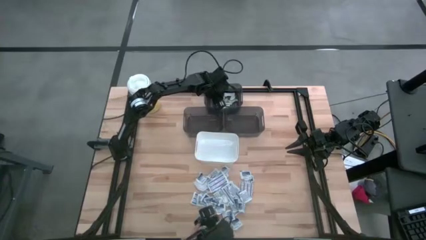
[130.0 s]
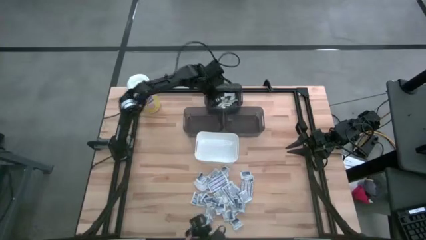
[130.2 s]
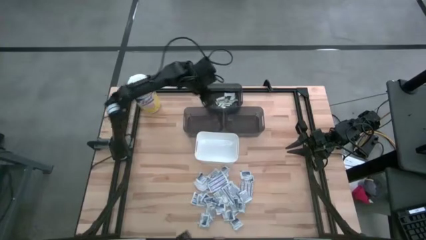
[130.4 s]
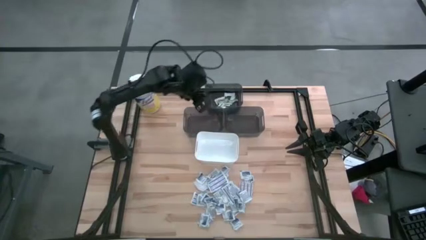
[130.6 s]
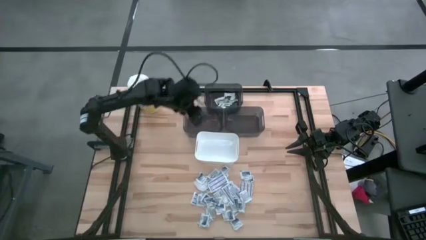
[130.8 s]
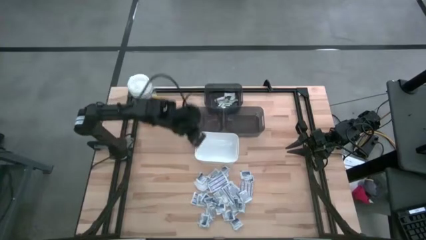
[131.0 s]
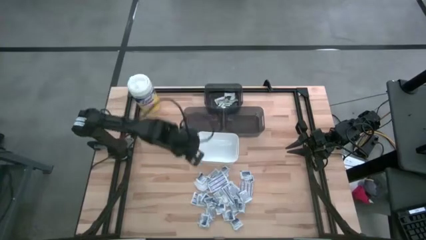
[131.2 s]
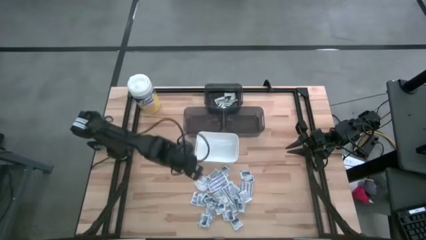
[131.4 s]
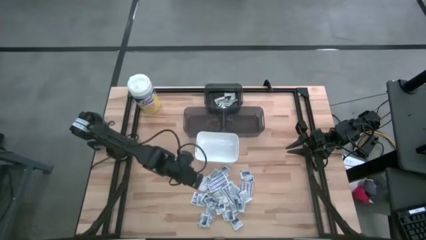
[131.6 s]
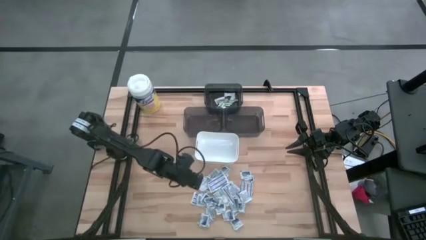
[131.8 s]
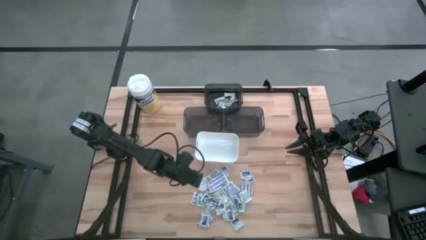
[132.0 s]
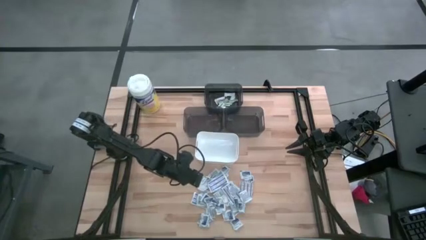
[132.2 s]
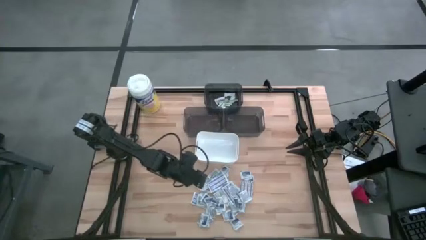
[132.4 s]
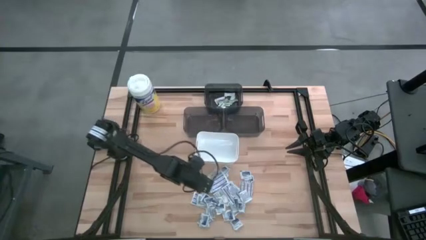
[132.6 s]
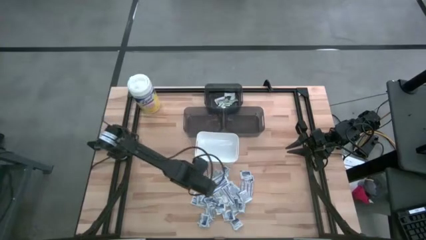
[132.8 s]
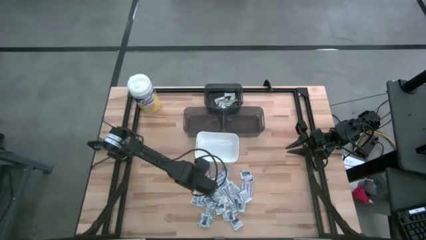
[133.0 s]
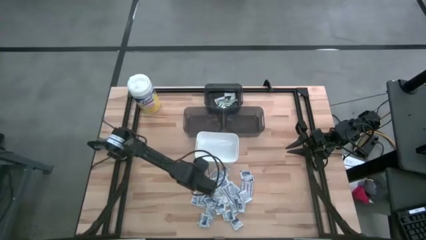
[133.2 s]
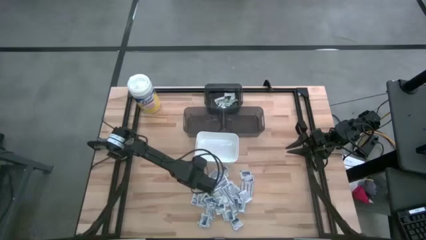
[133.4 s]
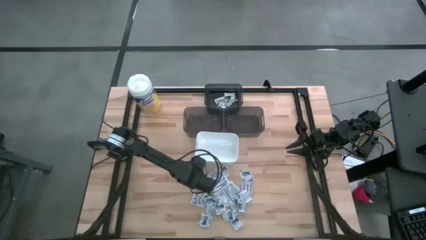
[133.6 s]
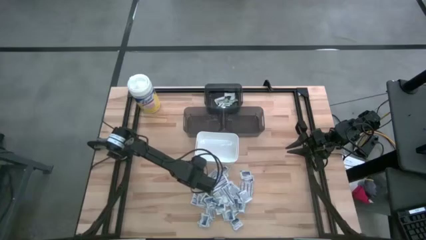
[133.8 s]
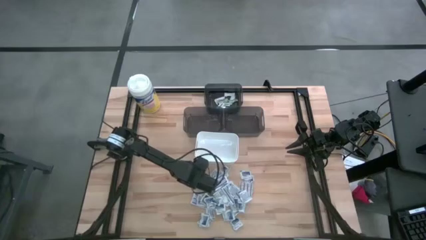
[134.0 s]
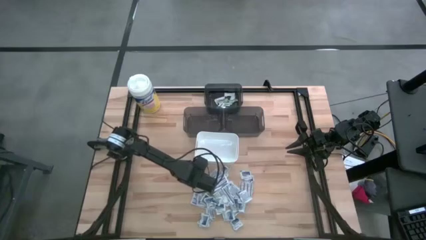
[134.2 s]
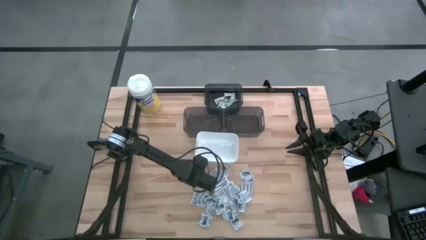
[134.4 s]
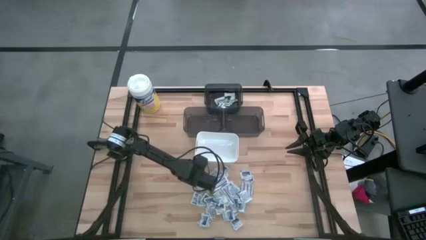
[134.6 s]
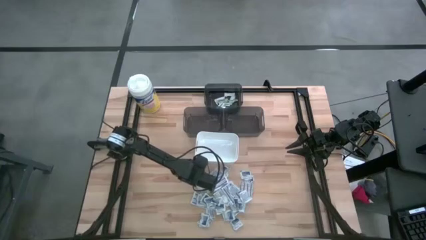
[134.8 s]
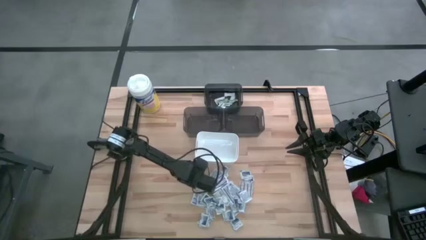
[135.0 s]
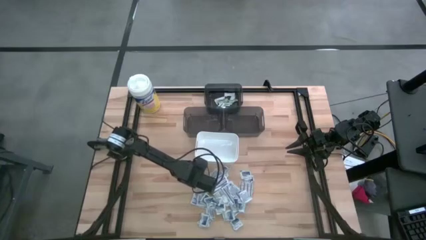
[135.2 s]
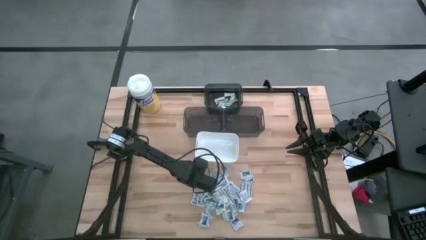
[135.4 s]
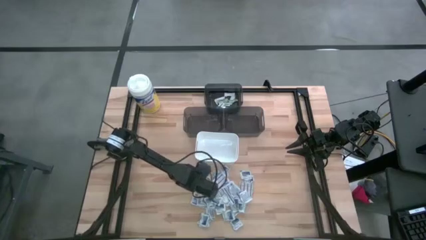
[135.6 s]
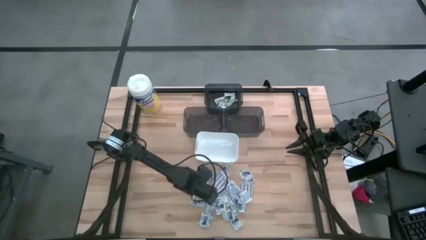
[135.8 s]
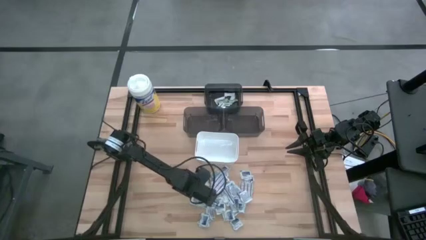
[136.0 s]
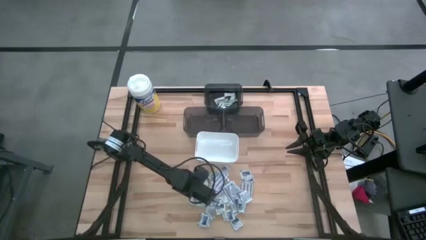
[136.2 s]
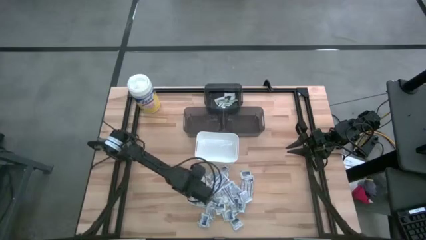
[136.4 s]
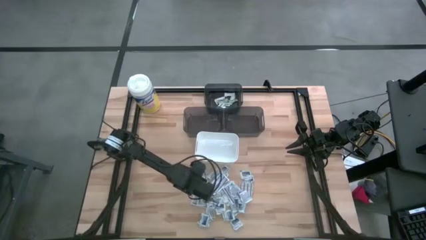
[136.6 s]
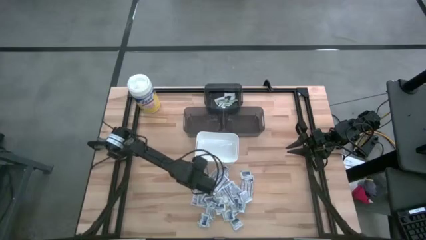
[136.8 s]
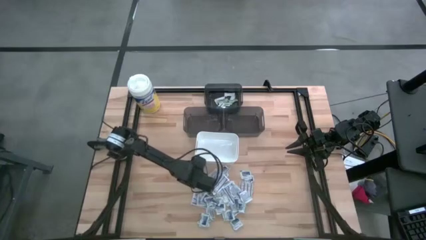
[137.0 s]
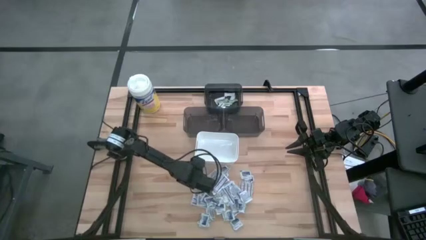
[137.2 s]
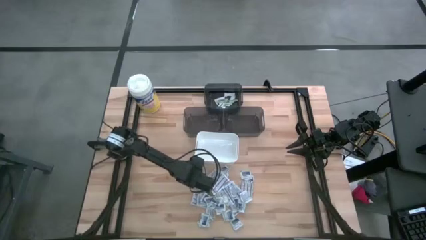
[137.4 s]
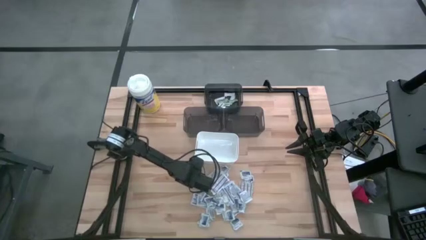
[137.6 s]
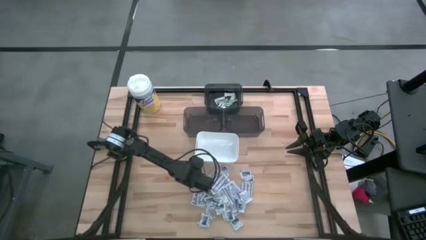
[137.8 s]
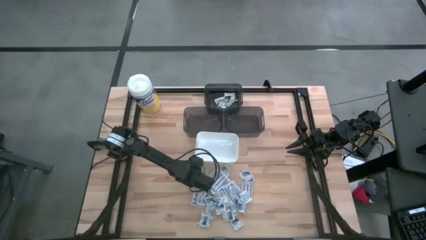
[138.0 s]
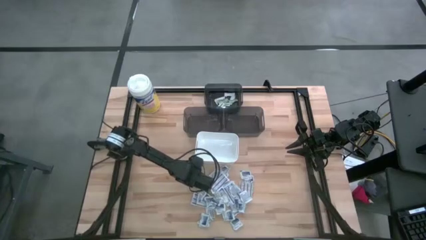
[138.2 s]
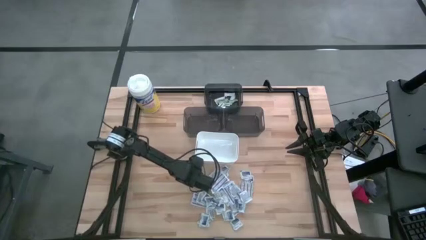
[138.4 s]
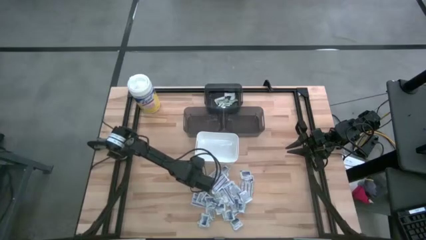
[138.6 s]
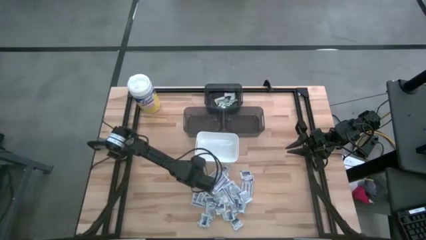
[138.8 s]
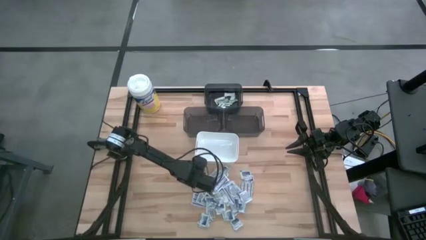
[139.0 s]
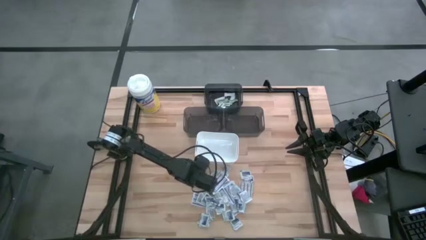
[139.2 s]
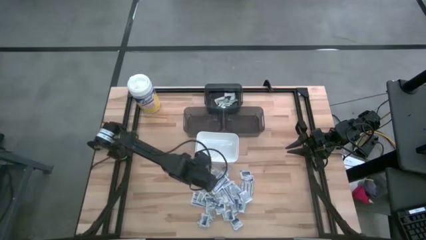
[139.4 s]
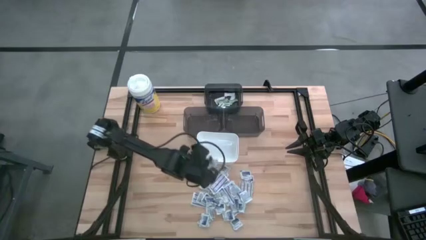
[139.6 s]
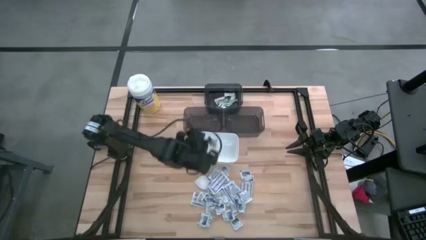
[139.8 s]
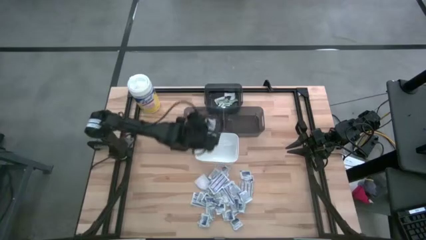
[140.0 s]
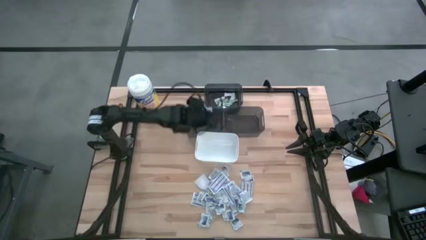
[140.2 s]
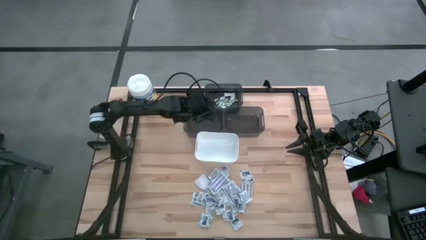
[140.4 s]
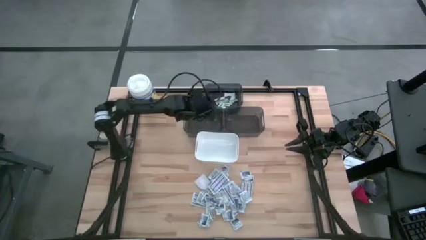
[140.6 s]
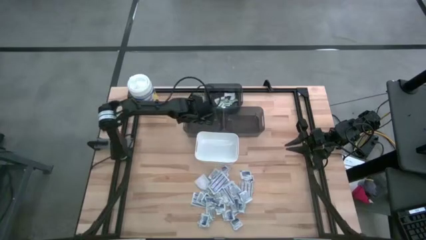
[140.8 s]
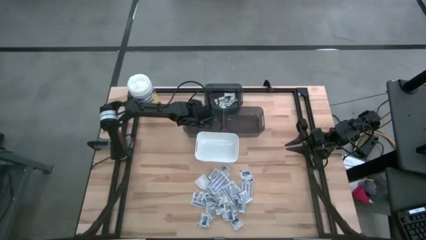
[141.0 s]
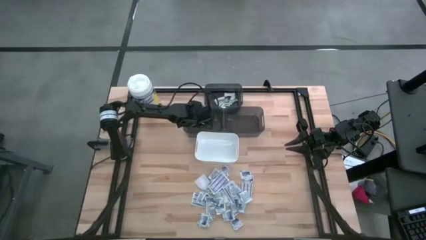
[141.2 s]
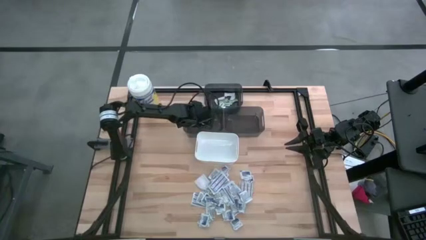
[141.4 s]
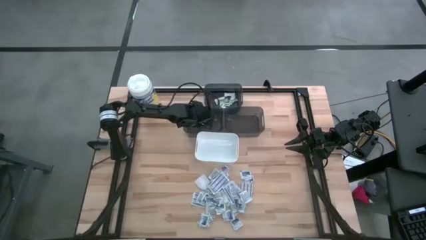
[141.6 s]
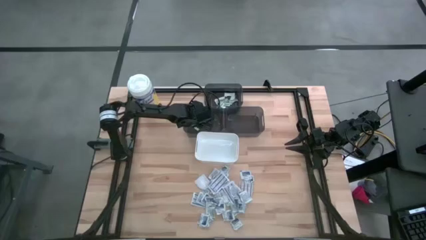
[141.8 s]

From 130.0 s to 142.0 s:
Task: Pick & Place First Aid Supplies
Put the alcohol pad into the left black bin

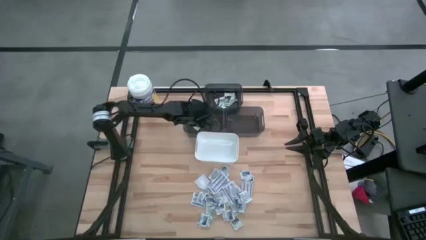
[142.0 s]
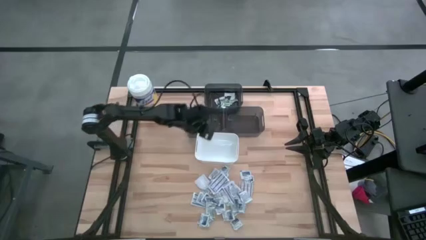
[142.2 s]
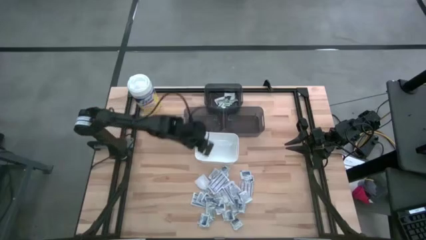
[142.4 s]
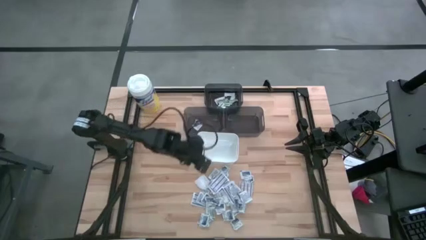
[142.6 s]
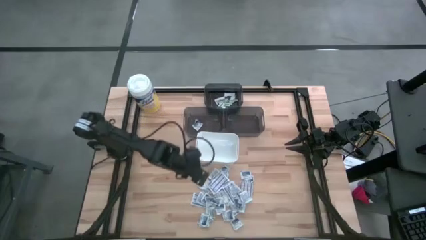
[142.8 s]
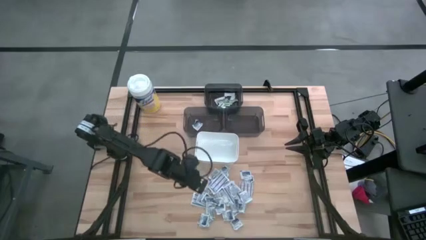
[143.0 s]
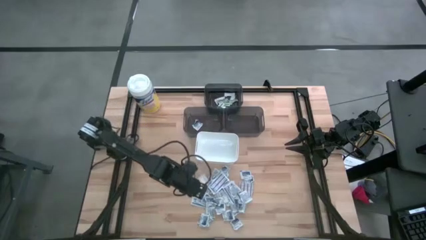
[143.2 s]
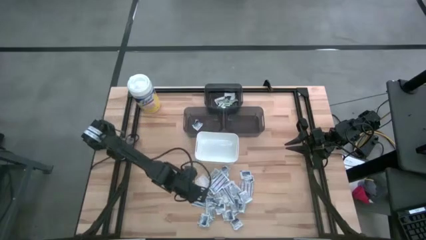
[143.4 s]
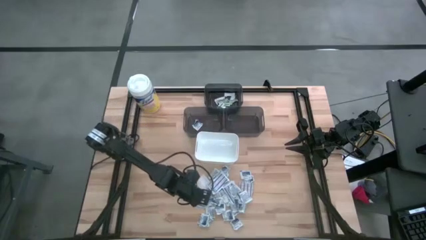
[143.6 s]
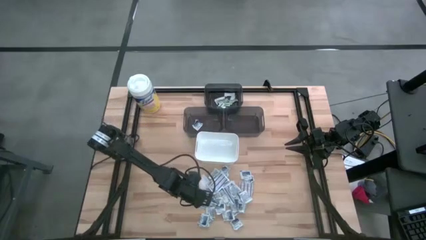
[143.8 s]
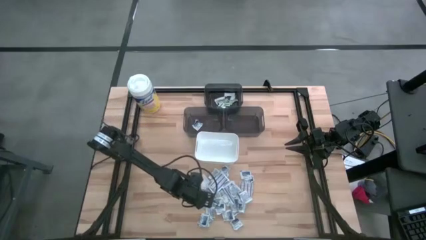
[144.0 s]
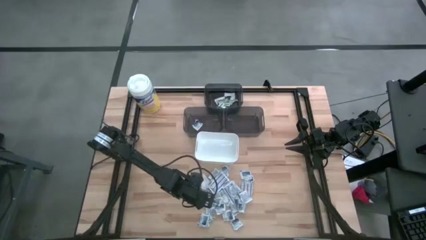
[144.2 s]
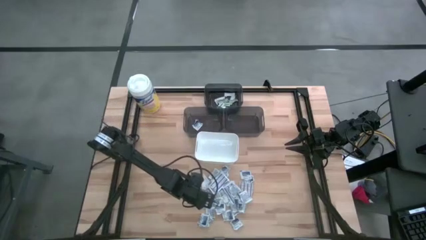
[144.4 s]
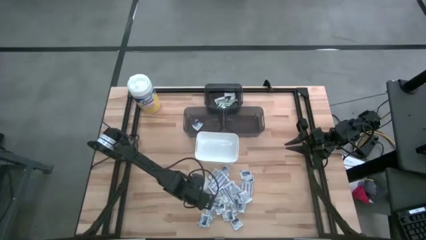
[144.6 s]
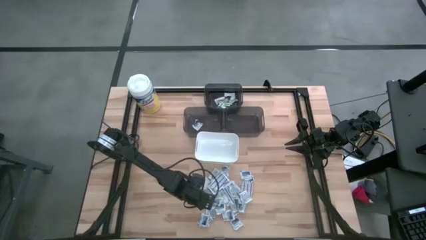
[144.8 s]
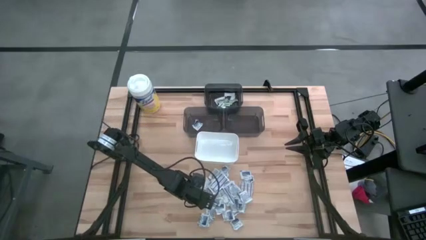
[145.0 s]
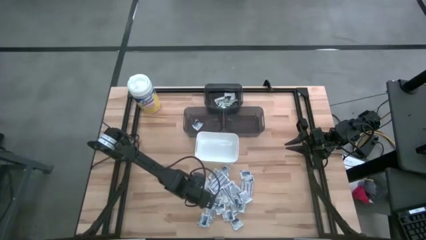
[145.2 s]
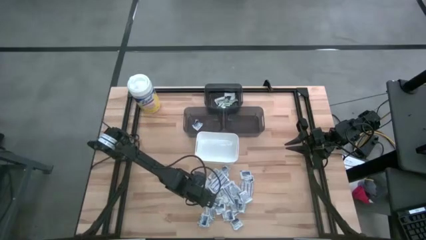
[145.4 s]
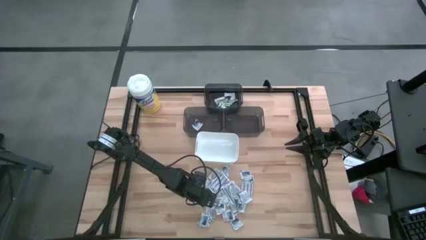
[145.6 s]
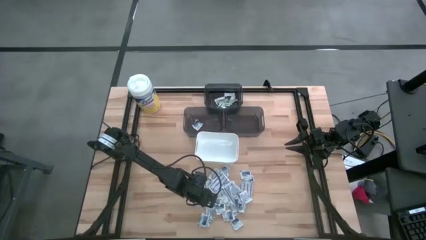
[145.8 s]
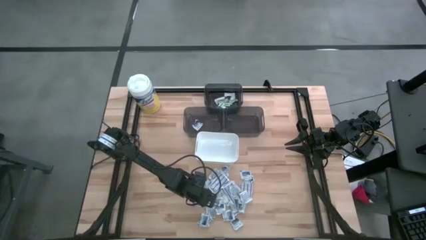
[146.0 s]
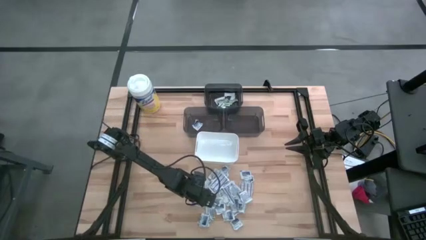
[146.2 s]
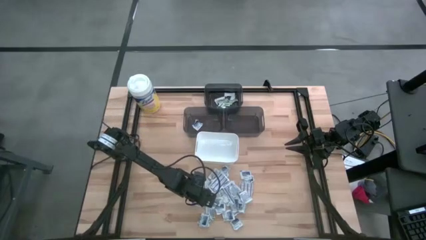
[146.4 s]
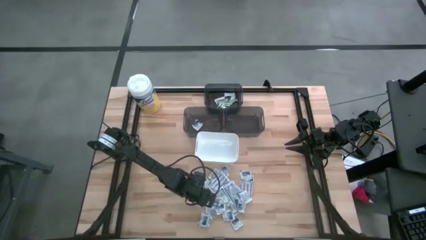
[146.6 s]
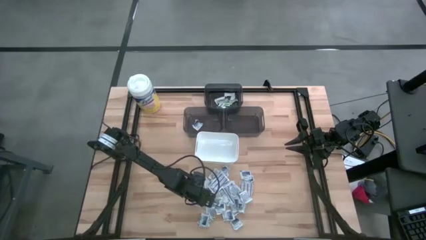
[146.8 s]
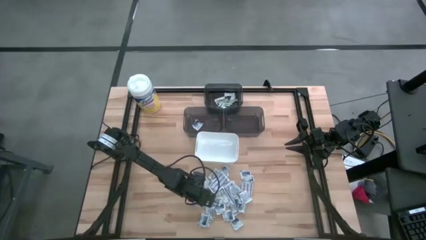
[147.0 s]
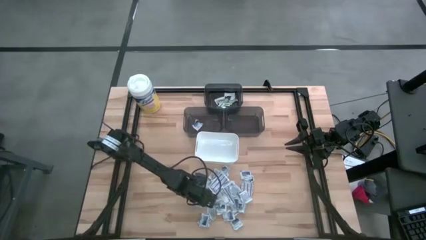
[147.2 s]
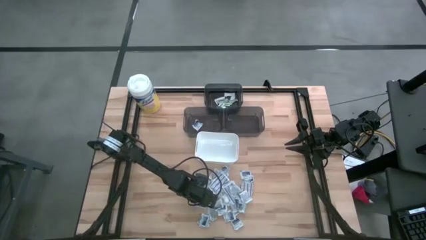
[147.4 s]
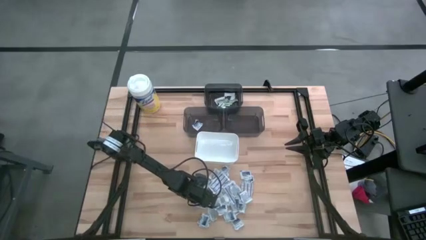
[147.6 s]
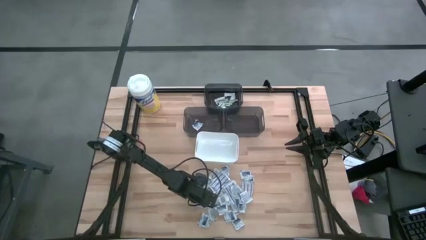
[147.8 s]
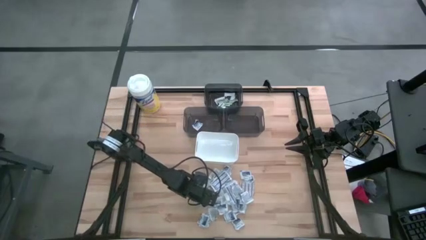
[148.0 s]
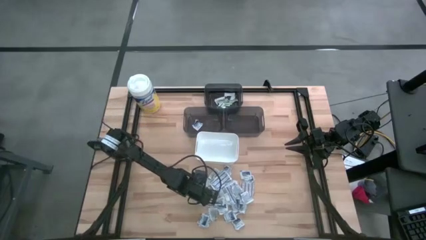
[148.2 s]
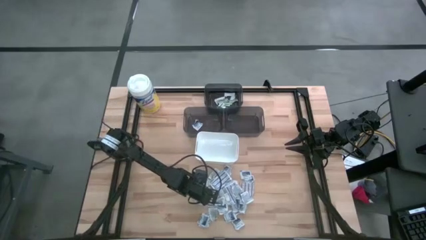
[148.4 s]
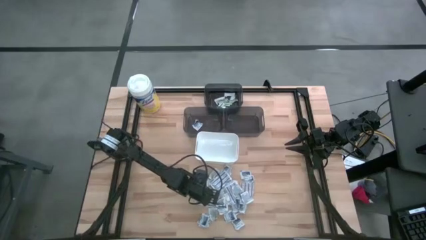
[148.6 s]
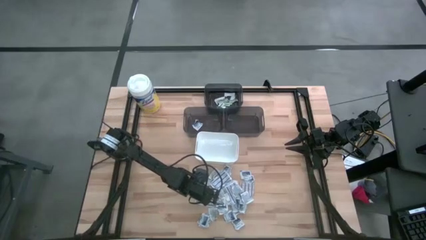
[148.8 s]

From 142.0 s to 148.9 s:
Put the alcohol pad into the left black bin
